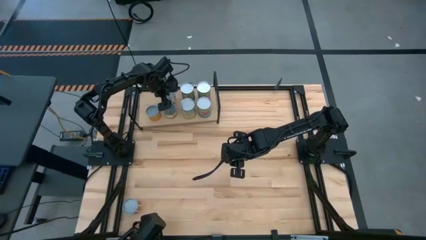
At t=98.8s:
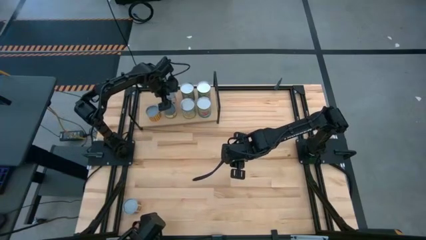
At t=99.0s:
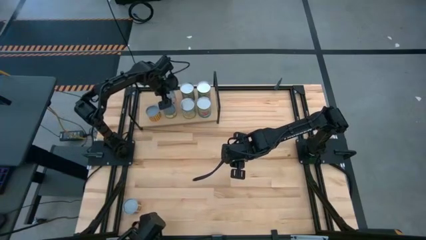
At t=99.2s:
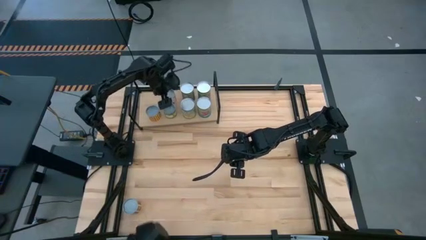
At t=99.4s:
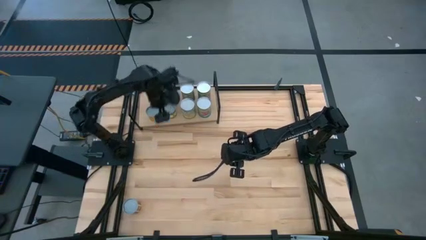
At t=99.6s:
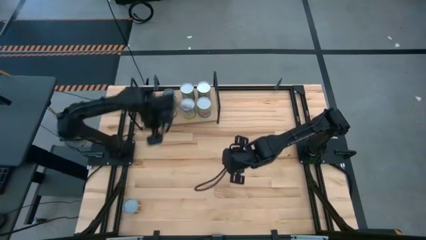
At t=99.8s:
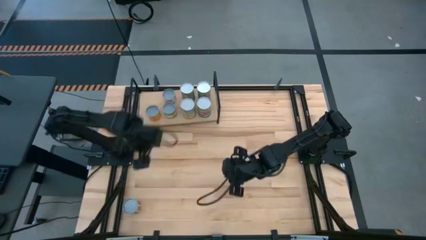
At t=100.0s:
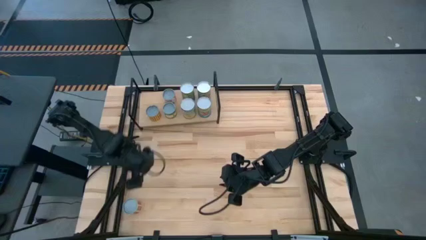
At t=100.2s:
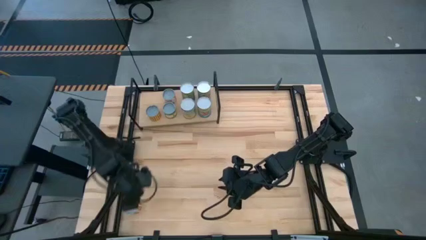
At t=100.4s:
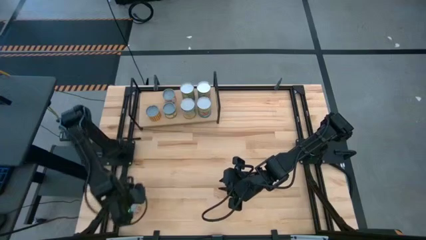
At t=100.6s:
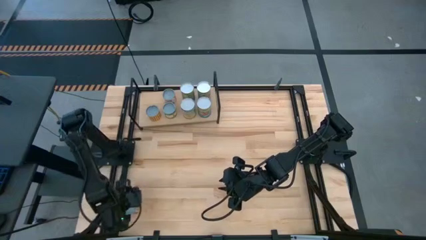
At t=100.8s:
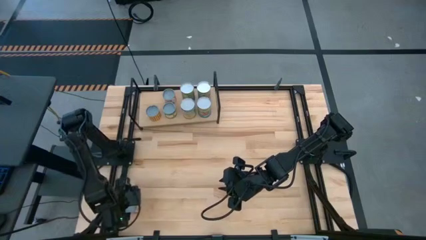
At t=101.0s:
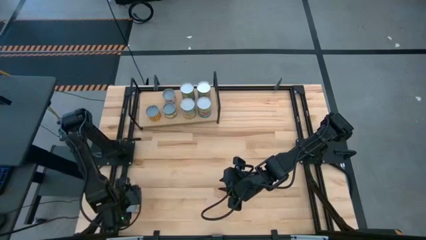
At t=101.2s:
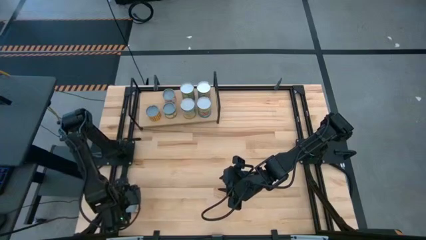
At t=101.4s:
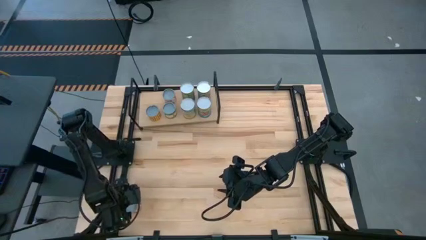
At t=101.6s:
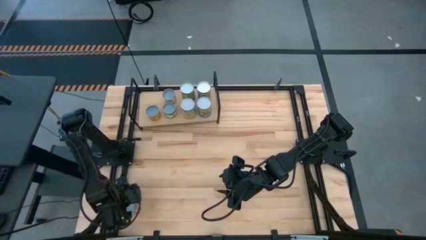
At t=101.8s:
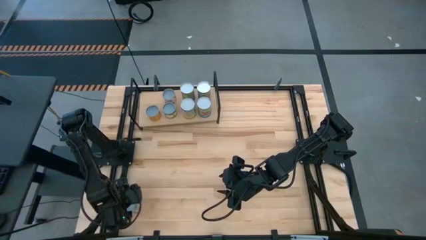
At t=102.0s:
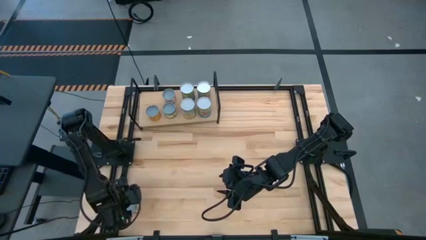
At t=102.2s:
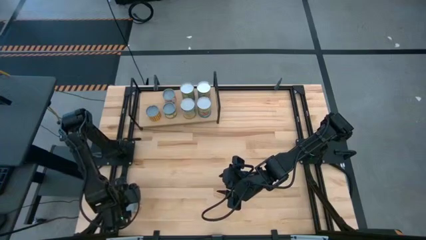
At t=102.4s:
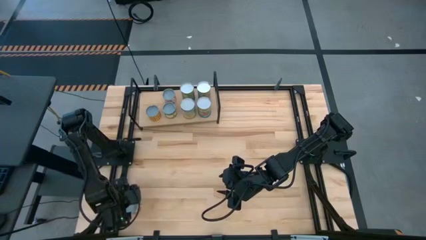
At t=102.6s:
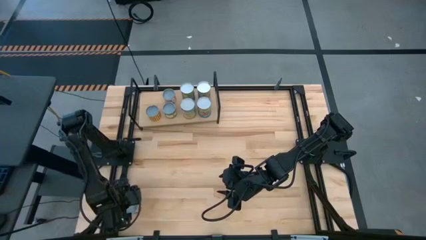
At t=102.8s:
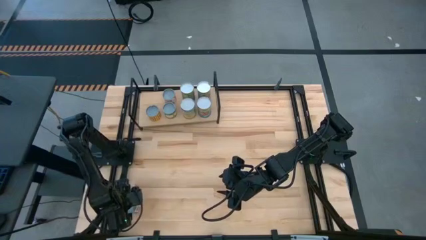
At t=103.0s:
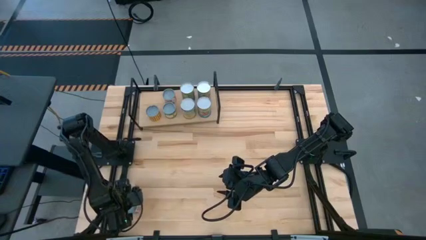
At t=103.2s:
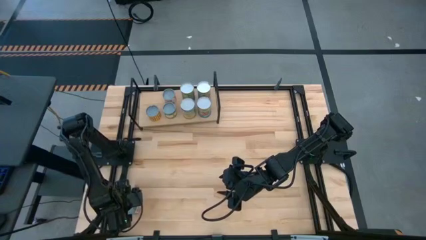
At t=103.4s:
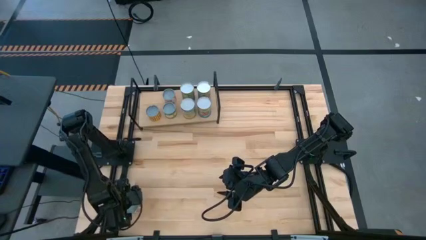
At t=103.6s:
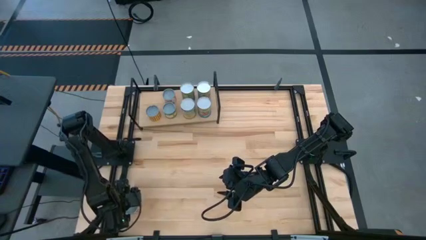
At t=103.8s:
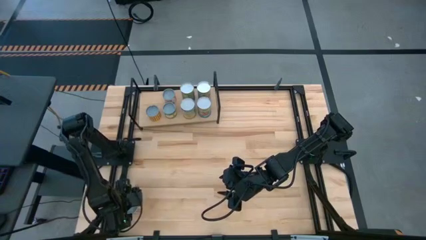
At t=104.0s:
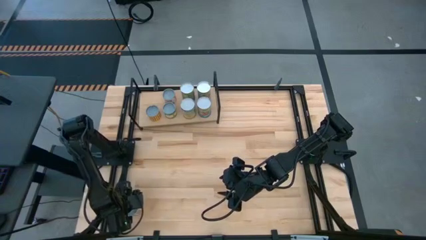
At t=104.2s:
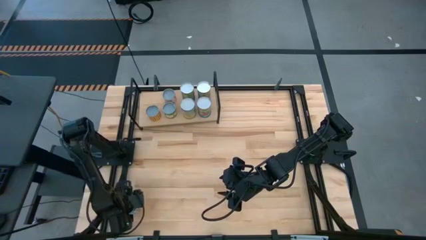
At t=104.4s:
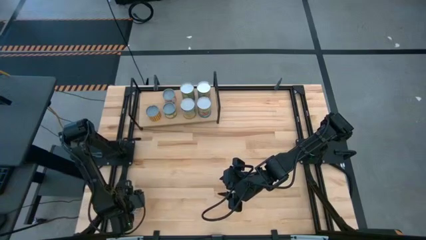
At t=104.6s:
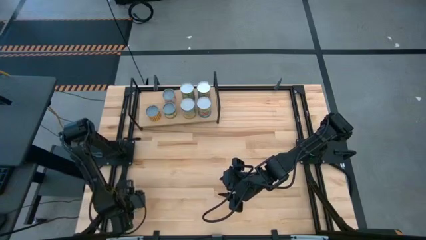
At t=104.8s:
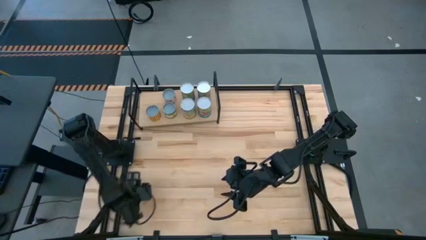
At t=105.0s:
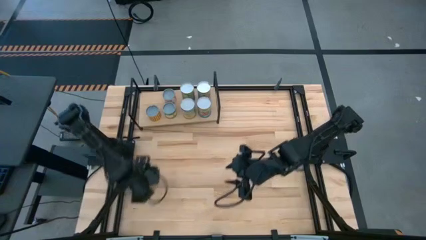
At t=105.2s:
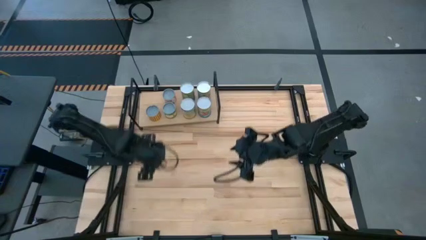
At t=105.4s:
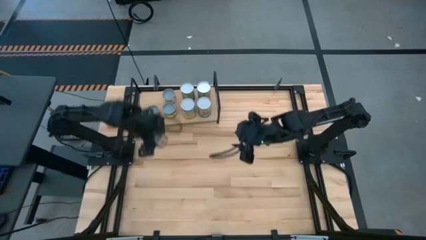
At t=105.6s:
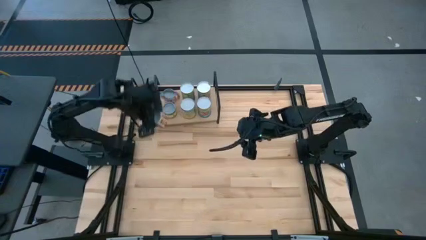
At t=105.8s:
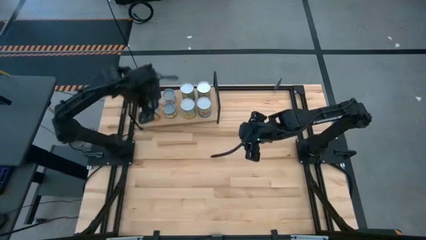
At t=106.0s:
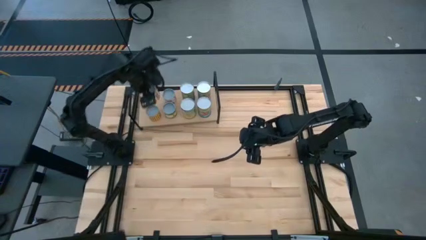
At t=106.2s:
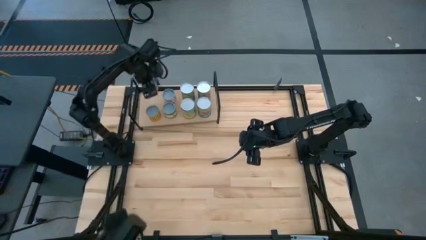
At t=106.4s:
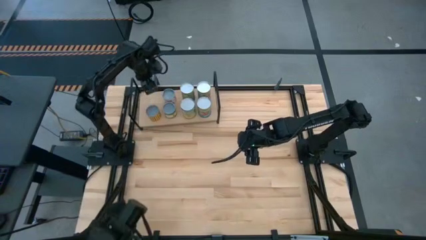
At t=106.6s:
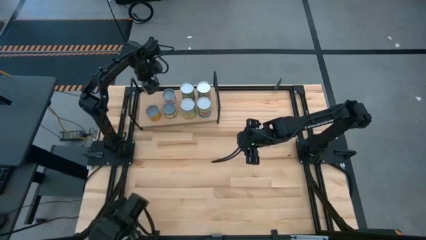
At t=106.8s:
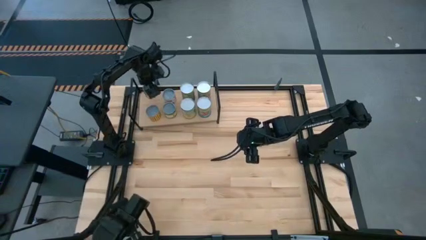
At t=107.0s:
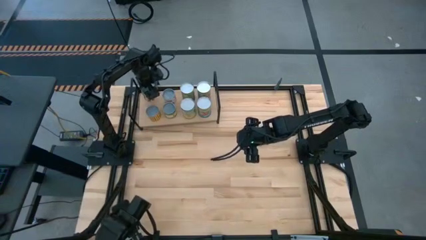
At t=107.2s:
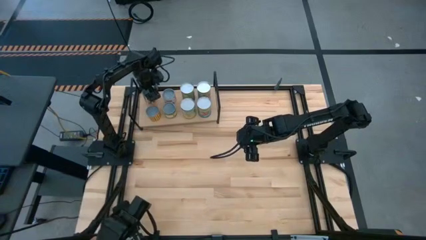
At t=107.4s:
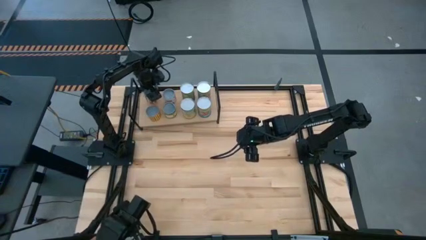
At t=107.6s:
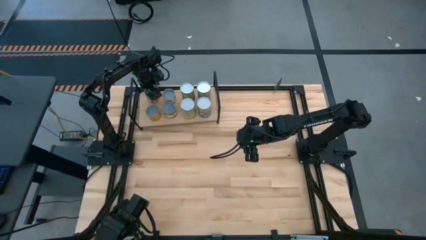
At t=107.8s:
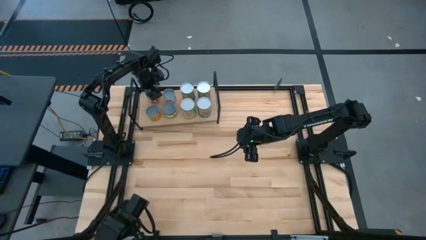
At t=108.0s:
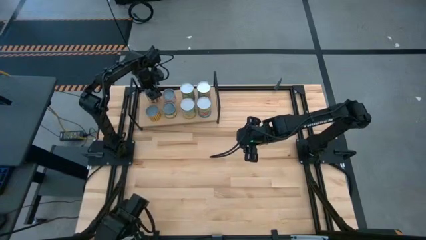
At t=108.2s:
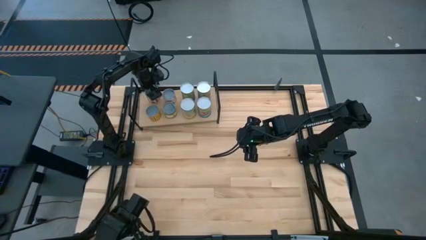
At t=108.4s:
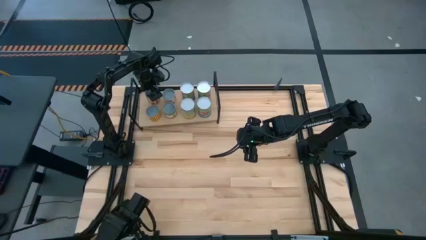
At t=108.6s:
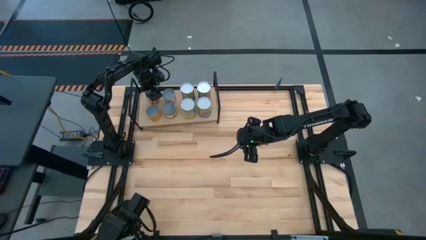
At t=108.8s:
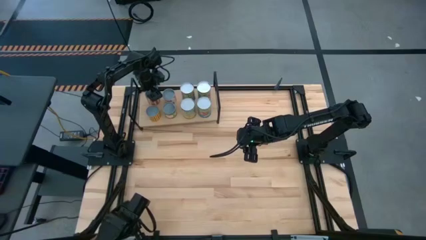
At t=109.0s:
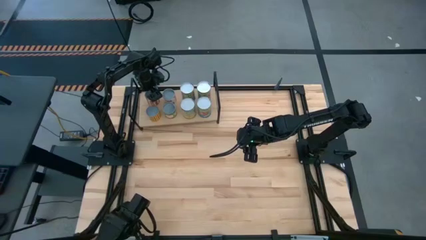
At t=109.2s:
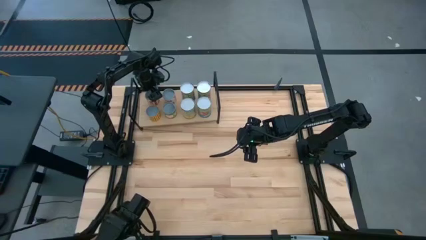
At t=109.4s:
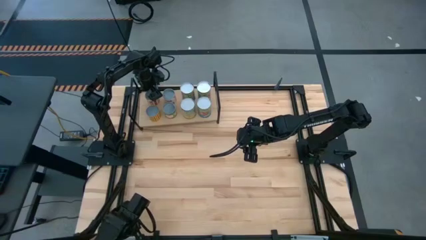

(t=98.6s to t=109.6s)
Task: Pick and place cans onto a shelf
Put the canned diced tomatoes on the shelf

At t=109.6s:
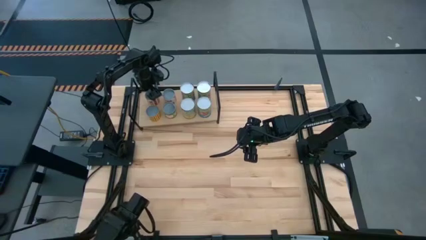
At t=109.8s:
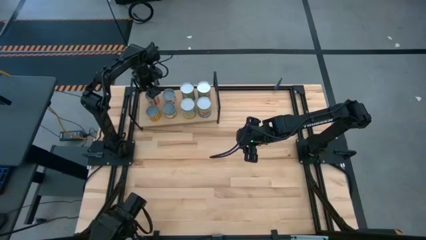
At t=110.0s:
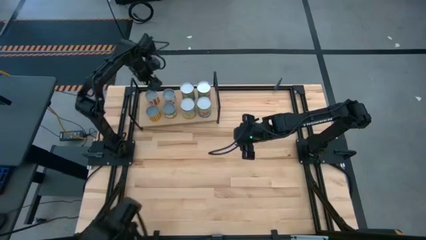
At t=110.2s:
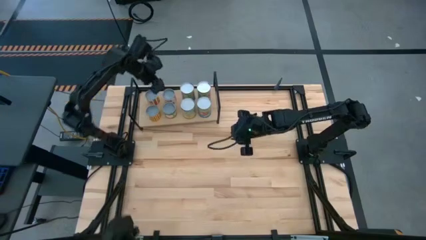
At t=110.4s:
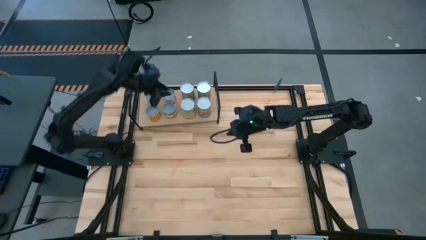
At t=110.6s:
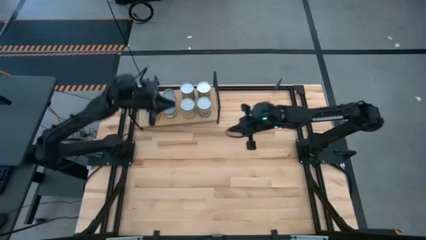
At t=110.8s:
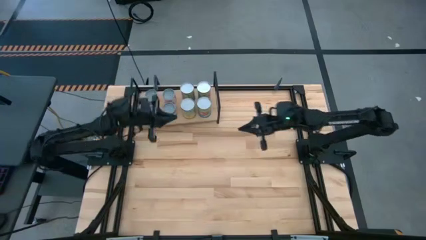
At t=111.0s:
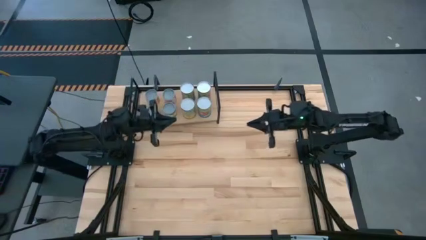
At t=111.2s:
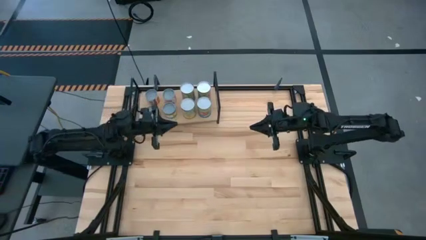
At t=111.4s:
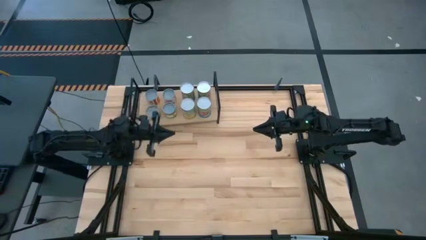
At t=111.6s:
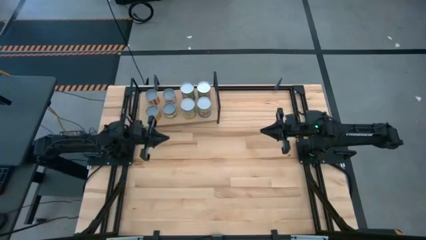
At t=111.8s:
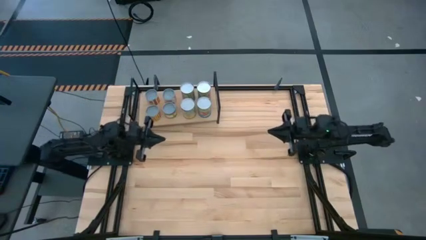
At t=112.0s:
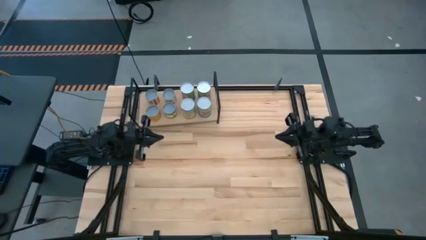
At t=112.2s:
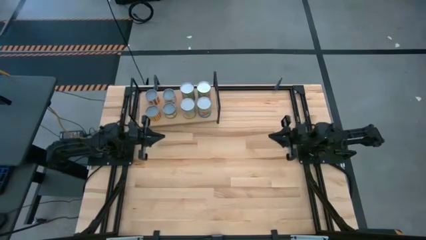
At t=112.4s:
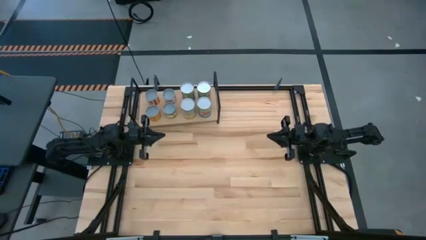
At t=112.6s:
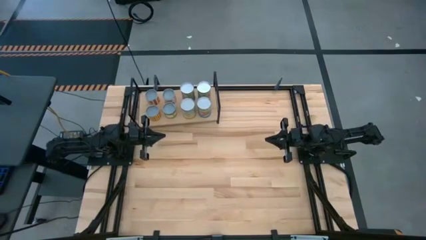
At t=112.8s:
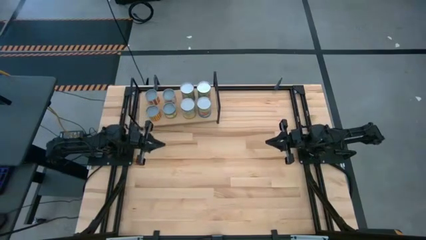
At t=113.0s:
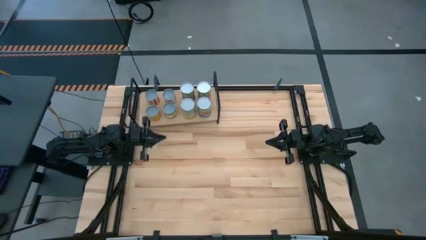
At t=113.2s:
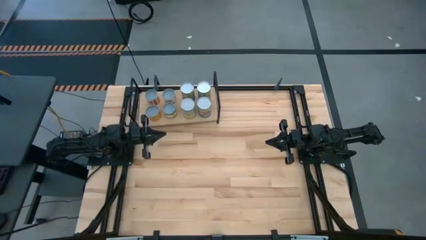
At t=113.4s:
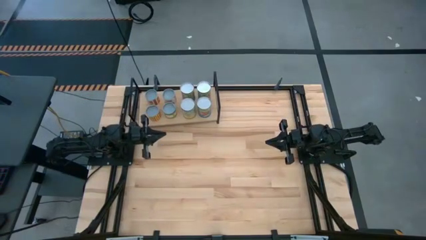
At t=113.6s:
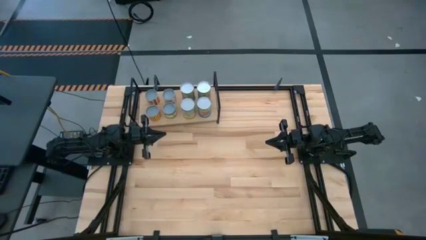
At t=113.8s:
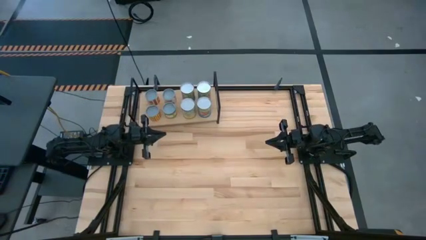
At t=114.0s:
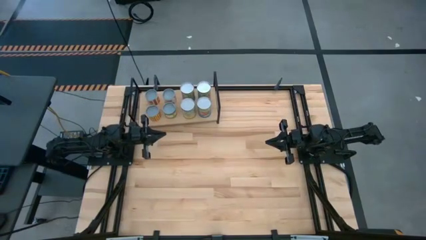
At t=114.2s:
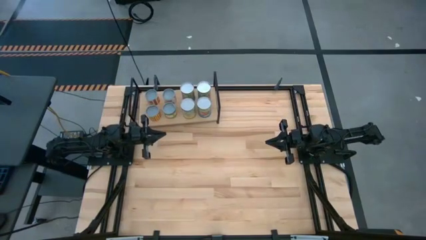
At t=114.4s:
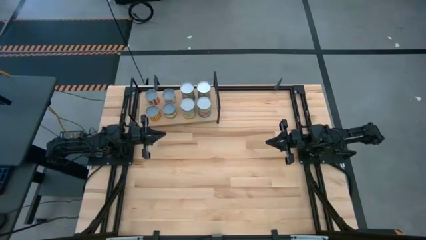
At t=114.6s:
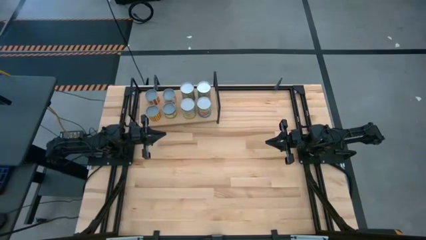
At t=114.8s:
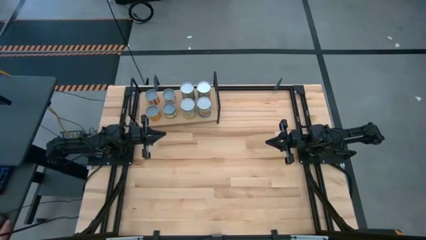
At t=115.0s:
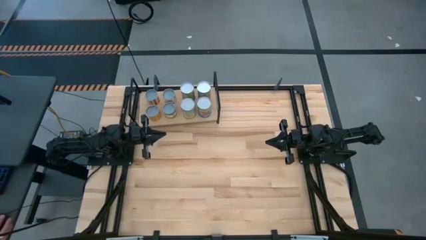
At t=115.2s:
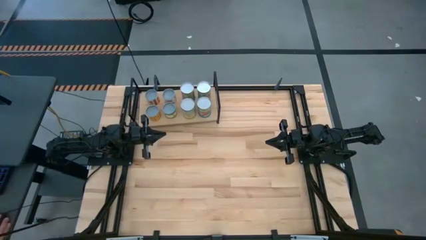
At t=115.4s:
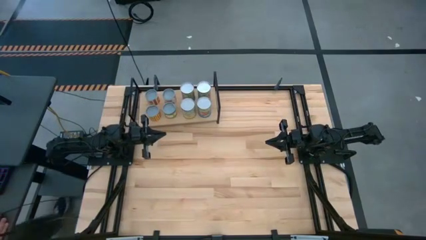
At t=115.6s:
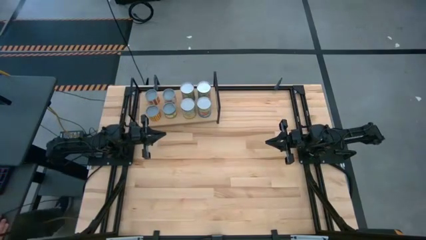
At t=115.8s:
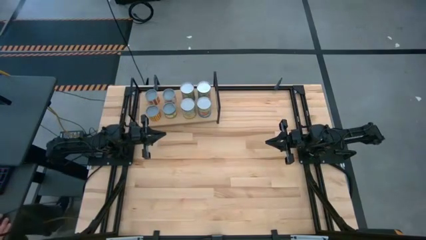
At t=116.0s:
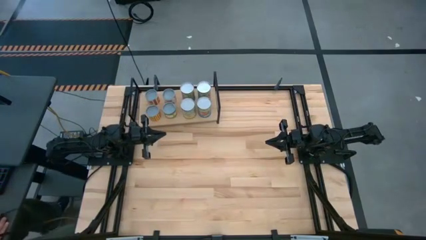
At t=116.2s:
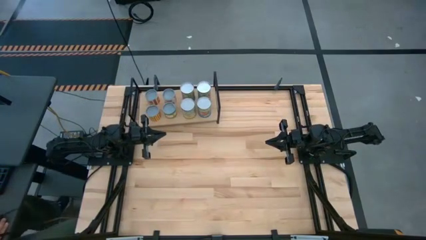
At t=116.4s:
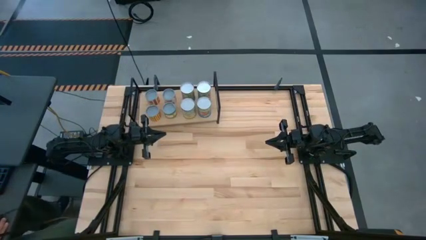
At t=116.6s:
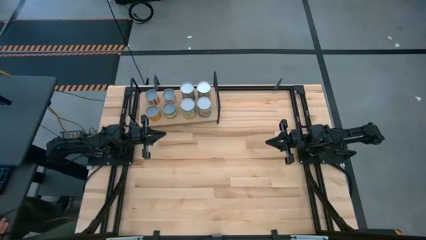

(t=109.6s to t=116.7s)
Return to Home Position
